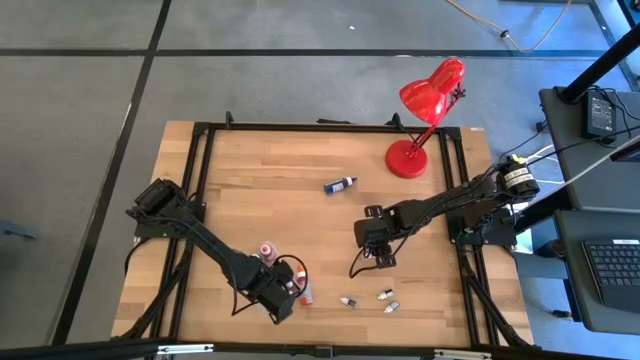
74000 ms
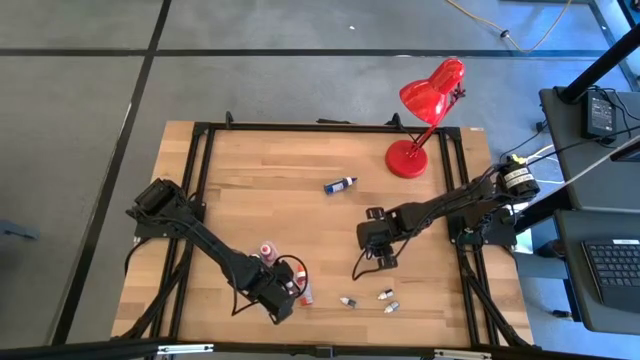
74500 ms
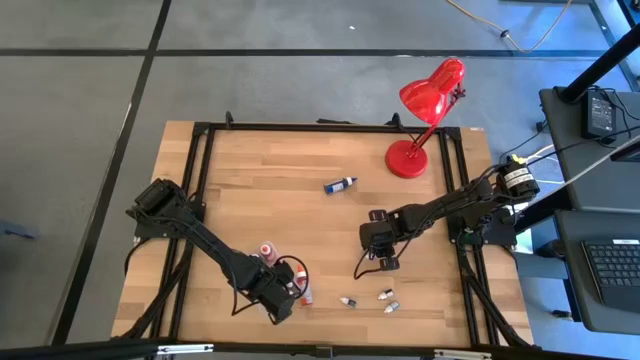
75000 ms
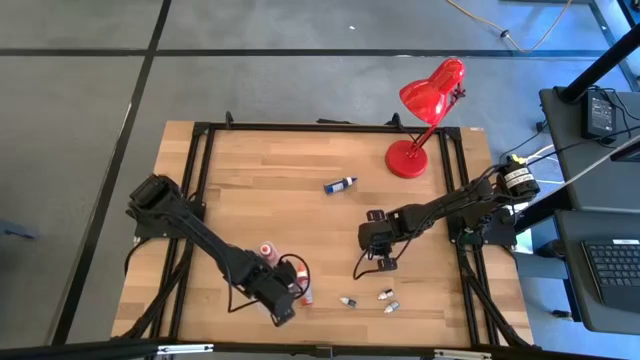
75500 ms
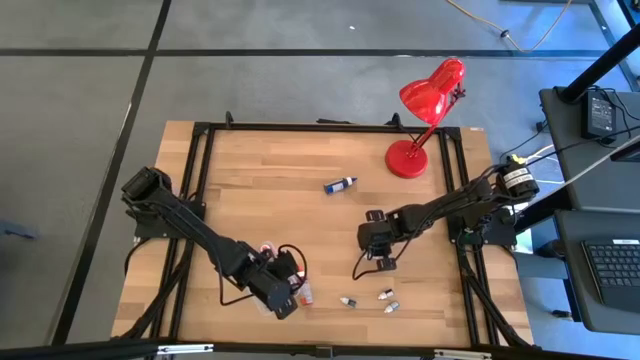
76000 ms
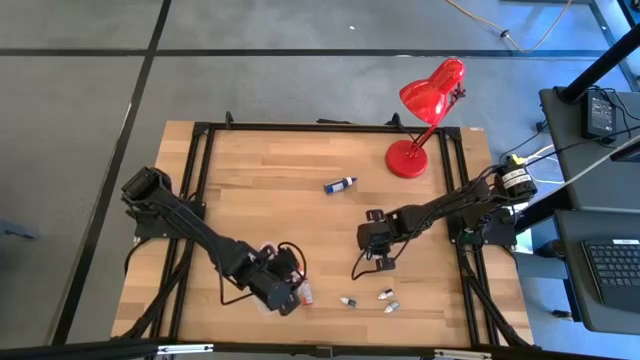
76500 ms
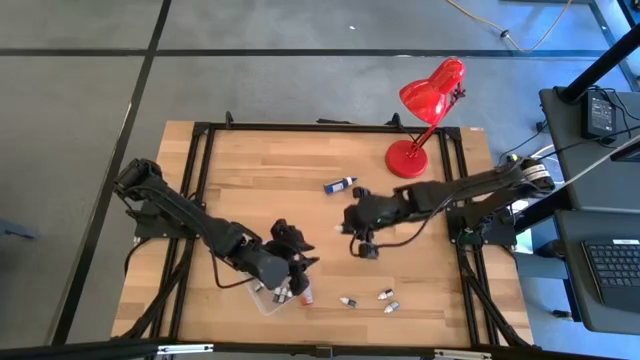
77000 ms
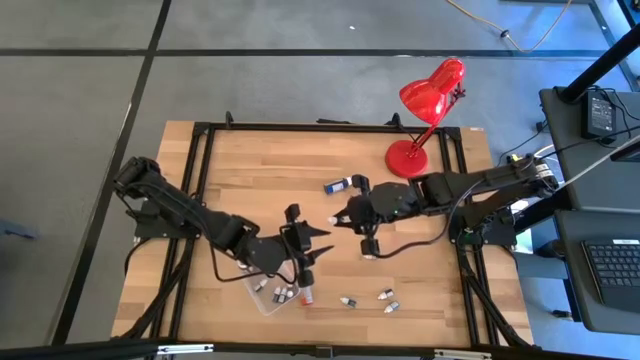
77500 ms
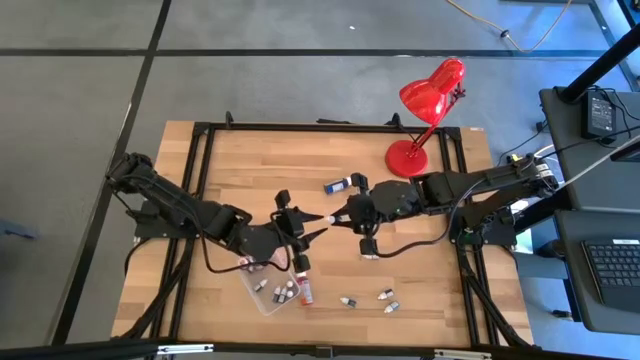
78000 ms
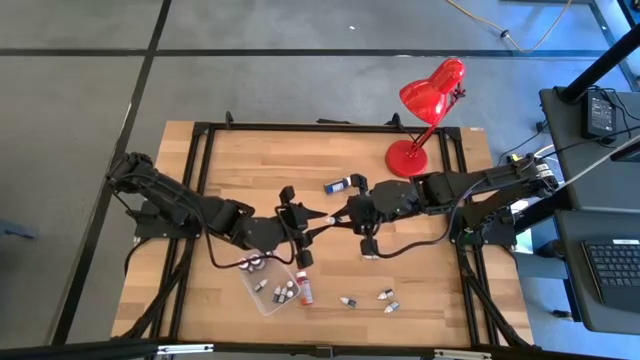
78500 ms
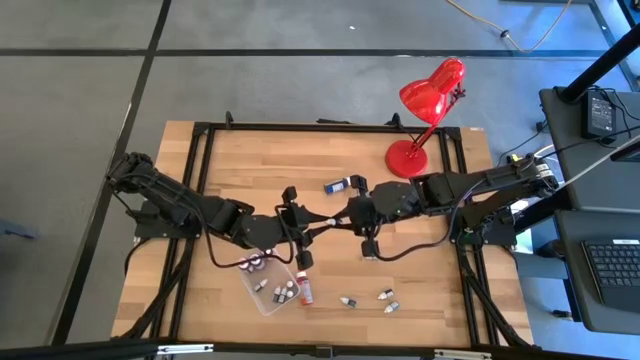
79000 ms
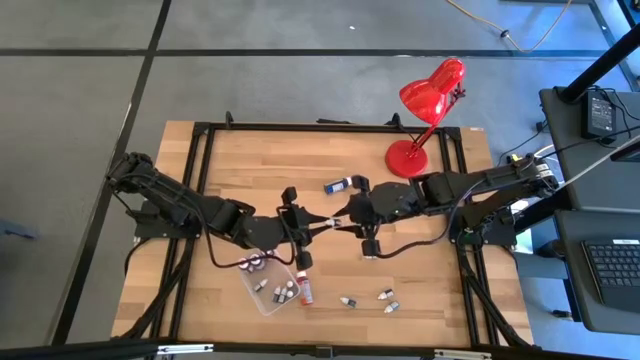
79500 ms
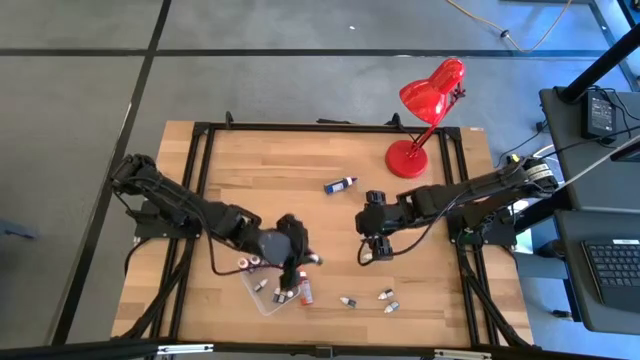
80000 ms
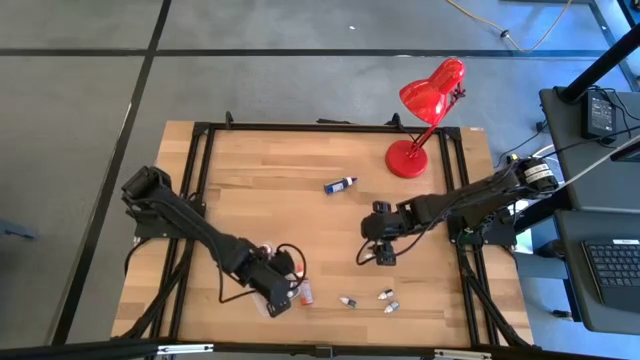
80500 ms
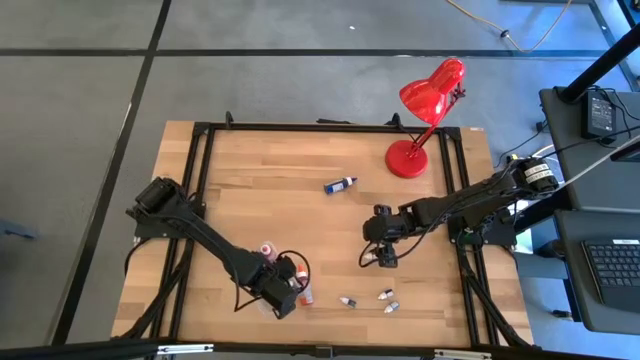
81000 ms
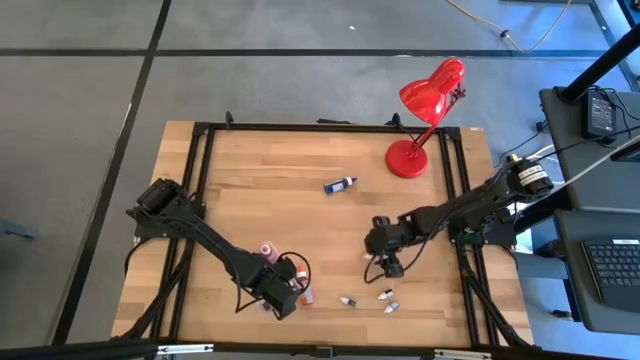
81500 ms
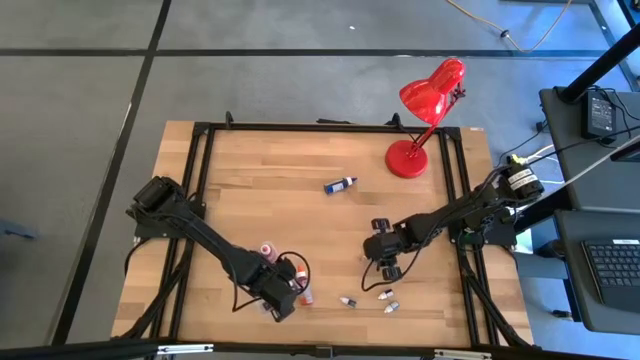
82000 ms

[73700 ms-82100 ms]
Task: Pick & Place food coloring
Put the green food coloring bottle into the transparent bin

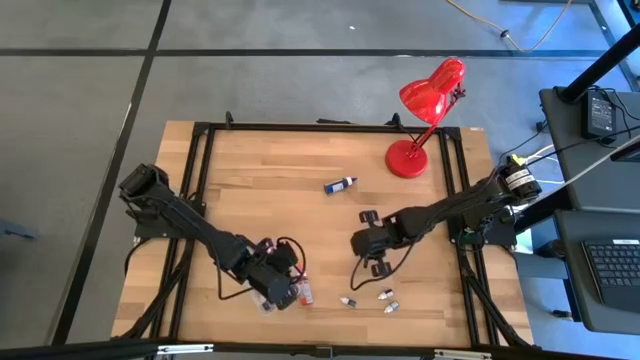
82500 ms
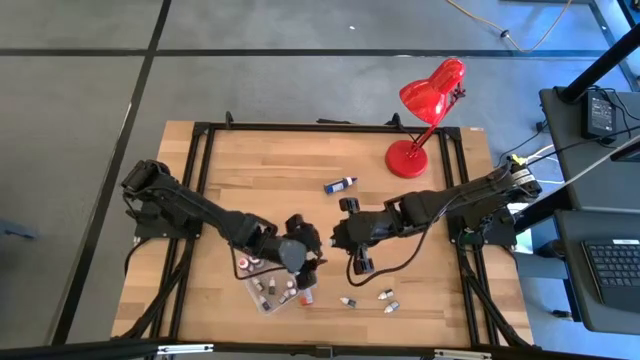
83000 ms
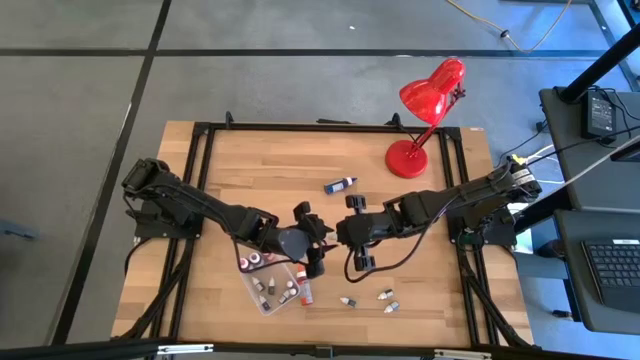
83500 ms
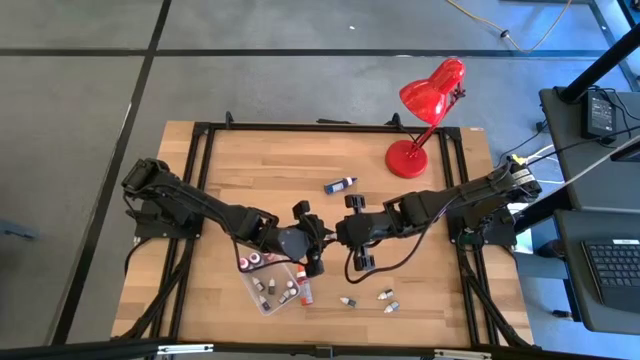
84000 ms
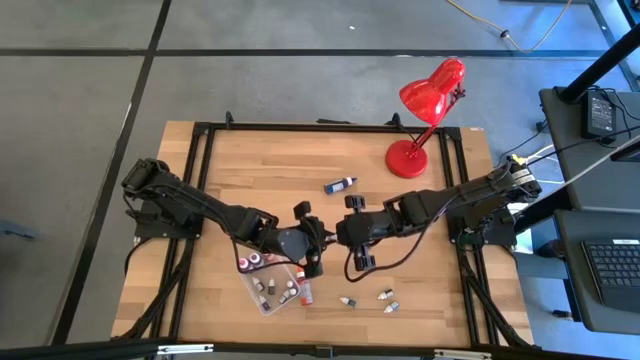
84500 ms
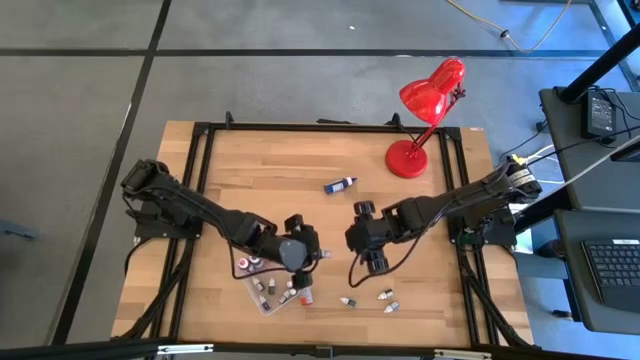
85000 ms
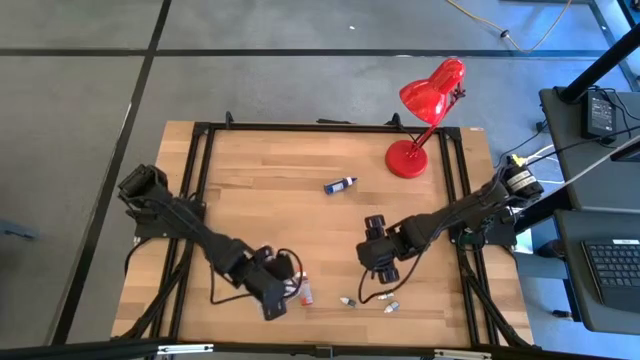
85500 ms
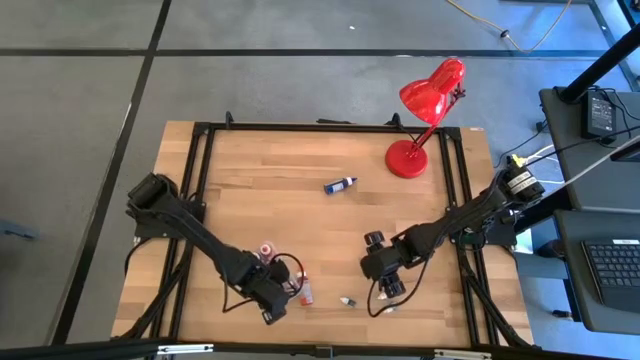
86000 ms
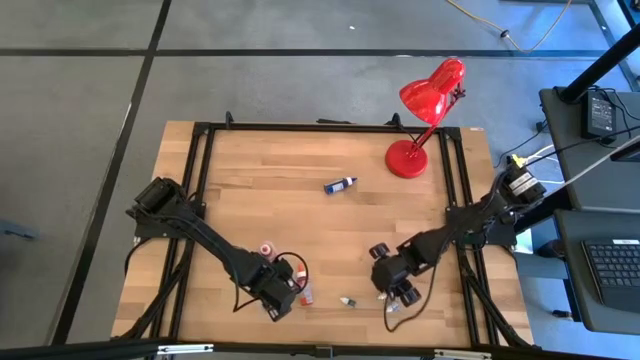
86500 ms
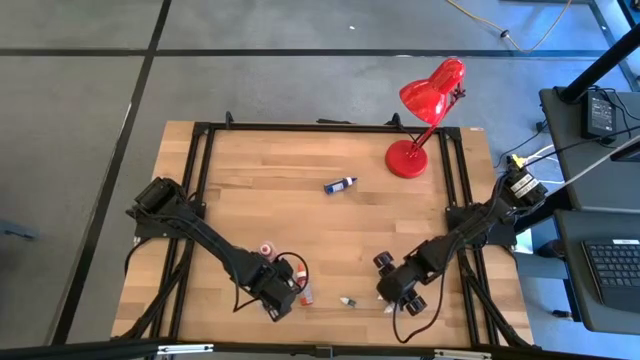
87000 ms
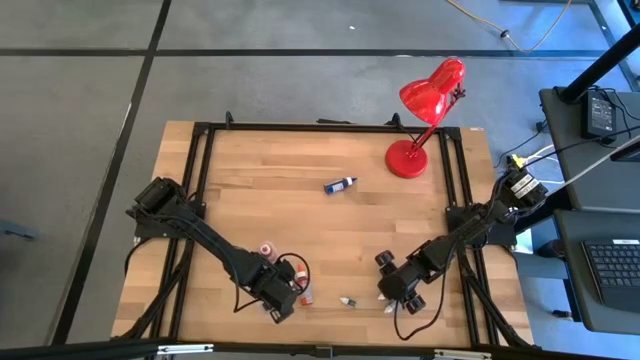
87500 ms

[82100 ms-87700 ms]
Put the green food coloring bottle into the transparent bin

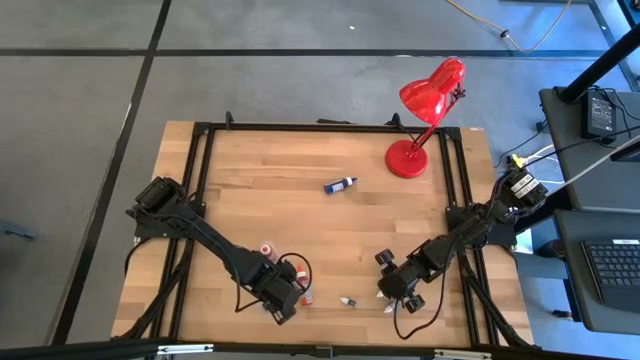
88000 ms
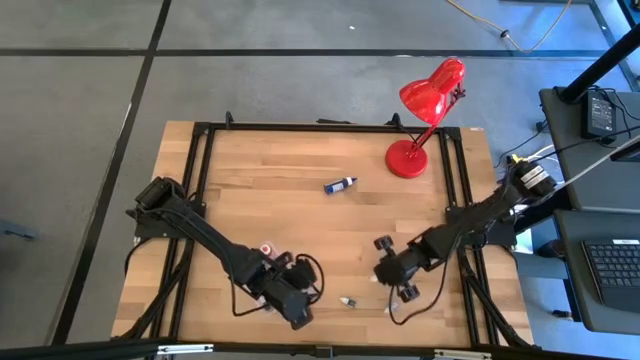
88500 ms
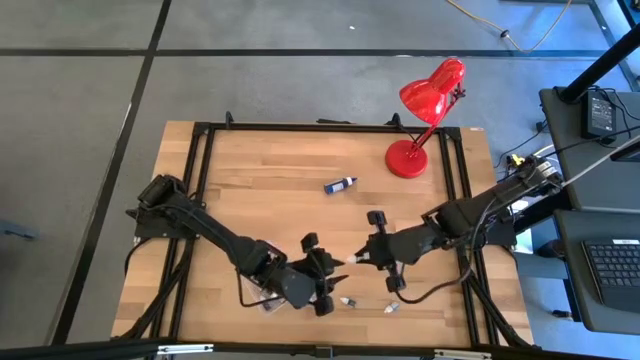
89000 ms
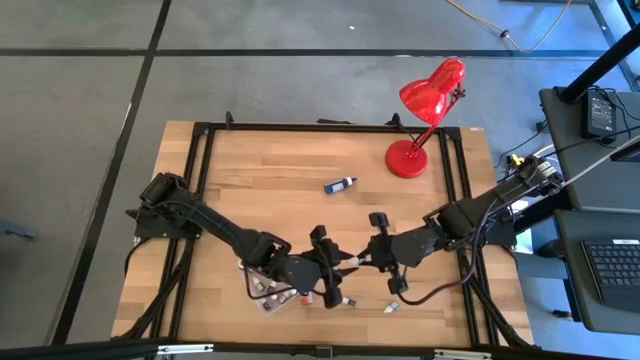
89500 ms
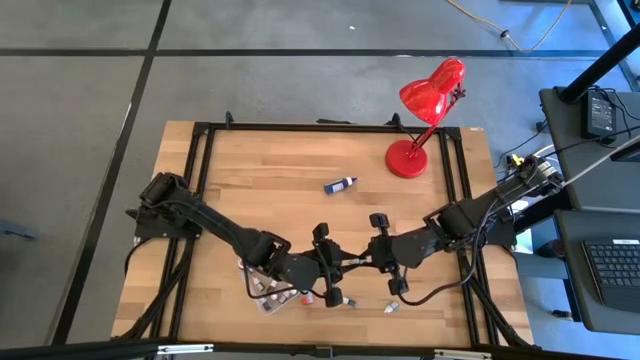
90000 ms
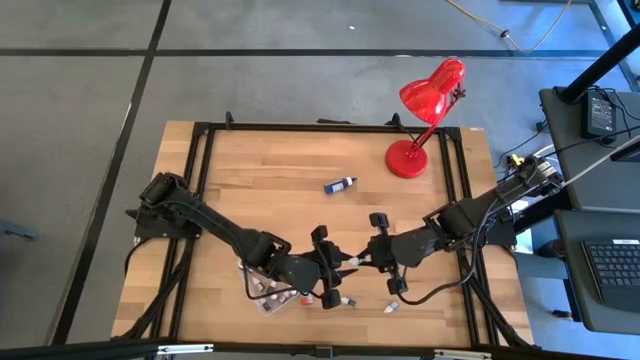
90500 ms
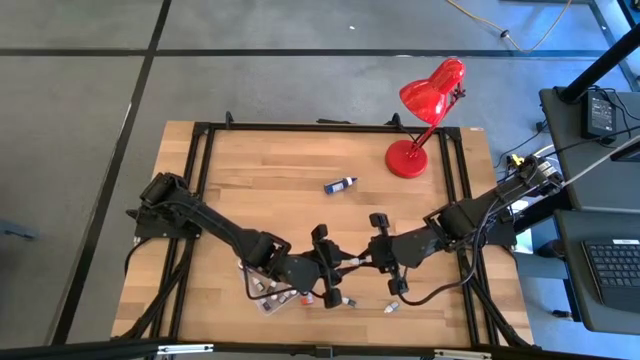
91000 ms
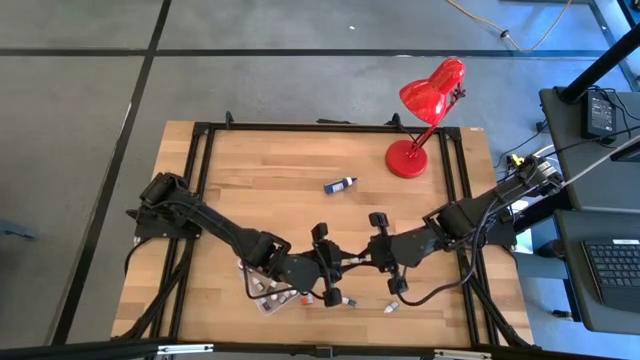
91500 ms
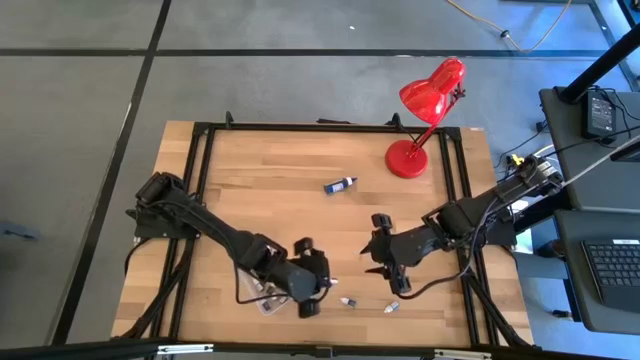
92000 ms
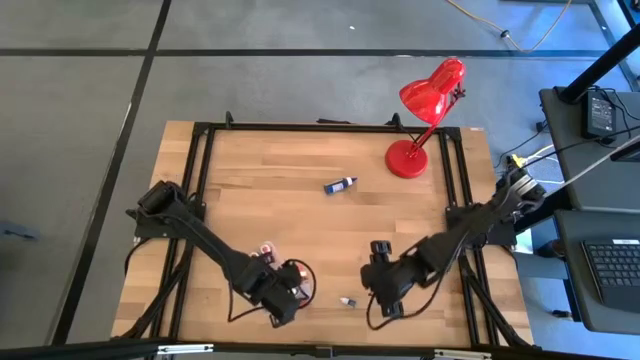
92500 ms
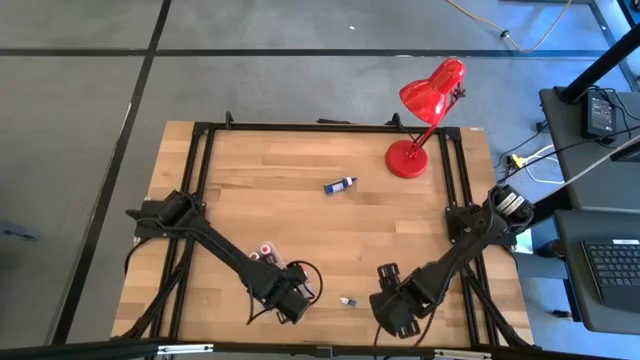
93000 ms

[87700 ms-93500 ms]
Put the green food coloring bottle into the transparent bin

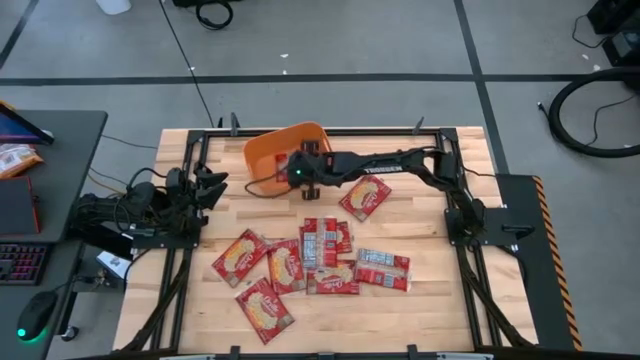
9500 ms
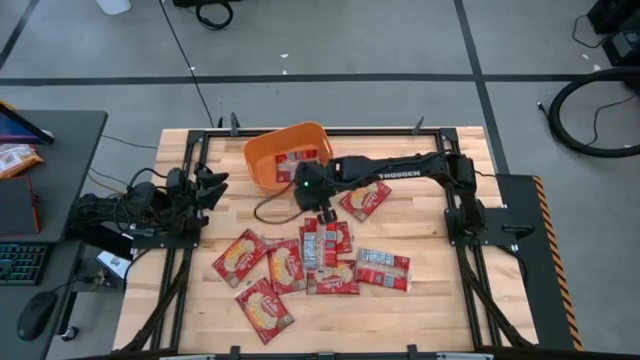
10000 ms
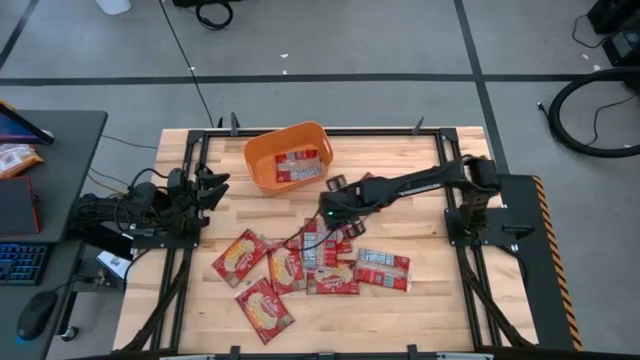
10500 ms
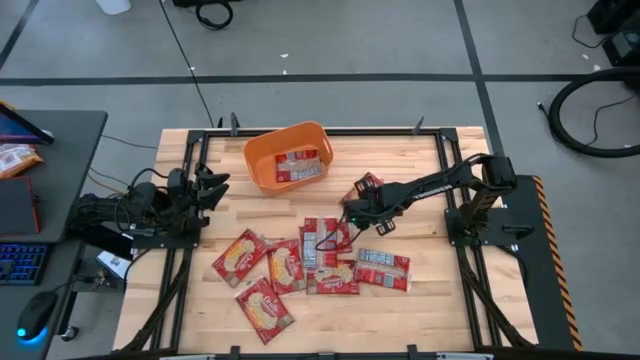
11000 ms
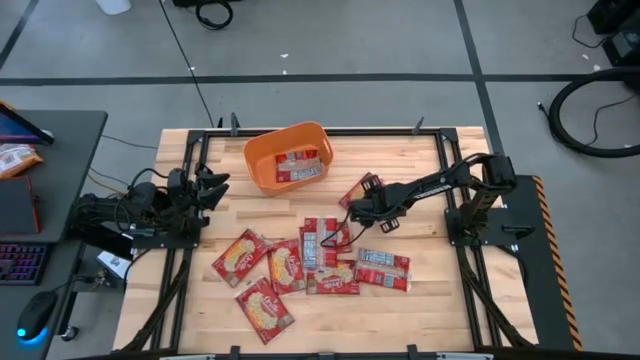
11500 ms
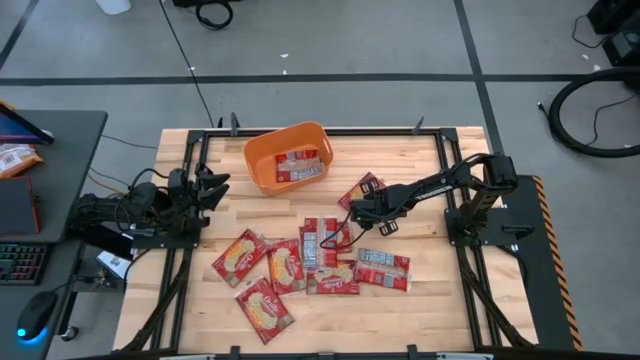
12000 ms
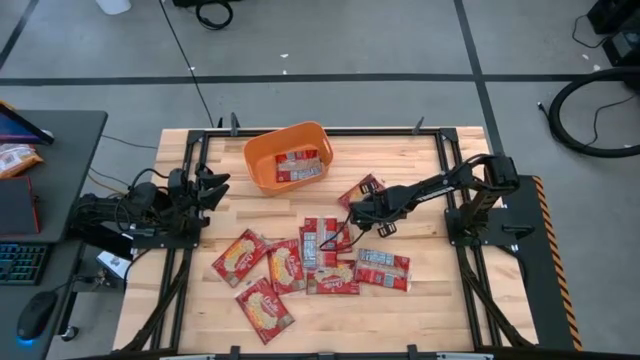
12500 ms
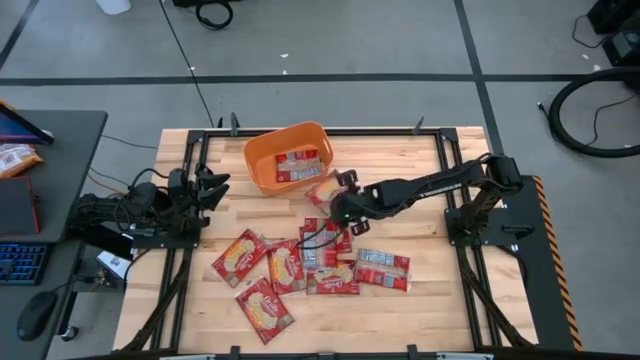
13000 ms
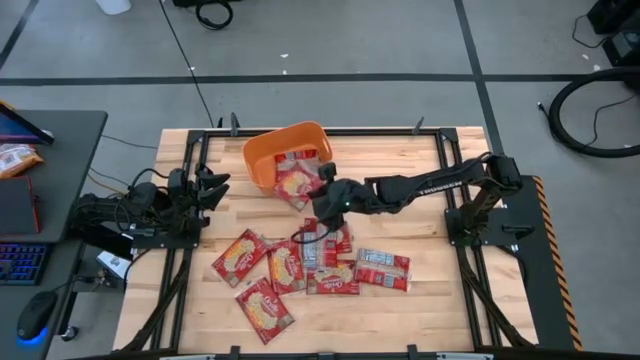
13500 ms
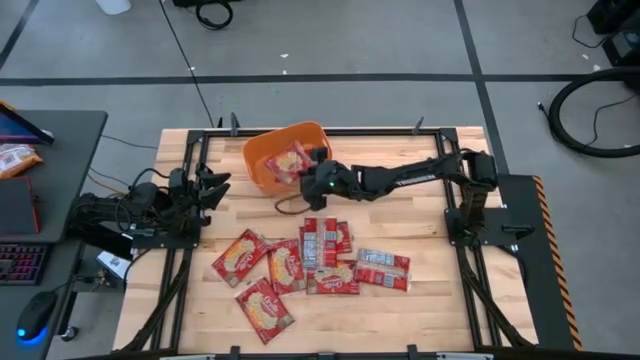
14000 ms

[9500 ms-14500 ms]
Task: Sort popcorn bags into baskets
Put the red popcorn bag into the orange bin
